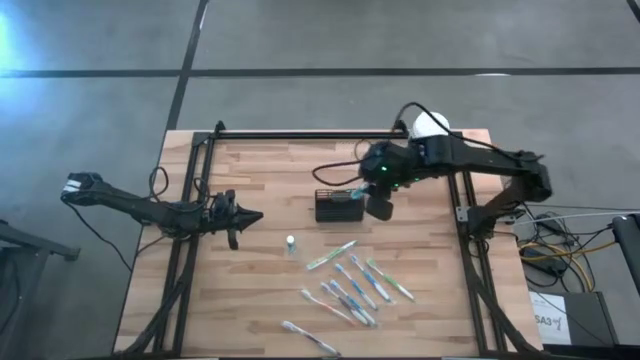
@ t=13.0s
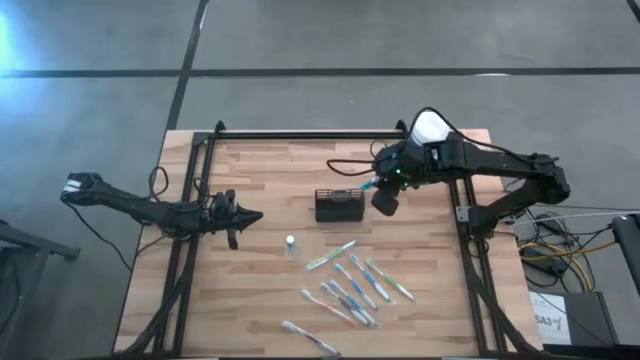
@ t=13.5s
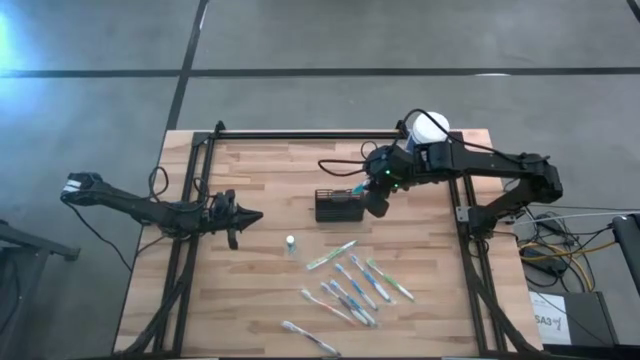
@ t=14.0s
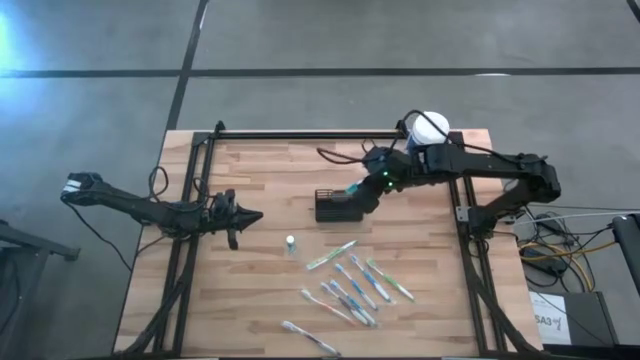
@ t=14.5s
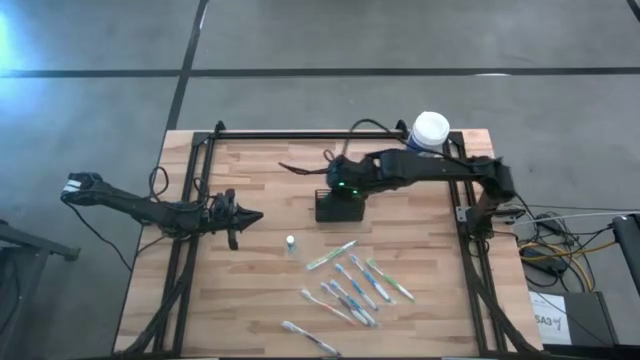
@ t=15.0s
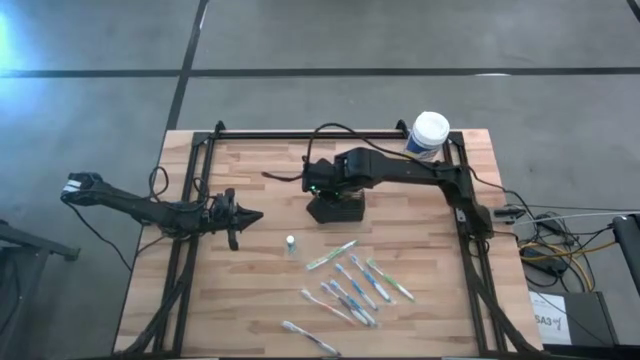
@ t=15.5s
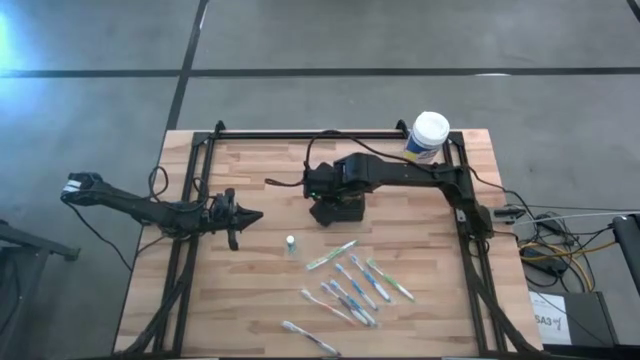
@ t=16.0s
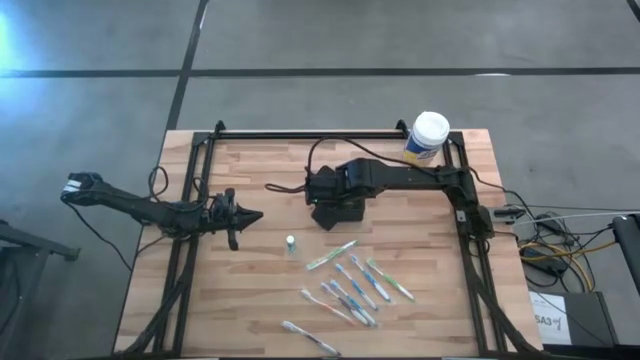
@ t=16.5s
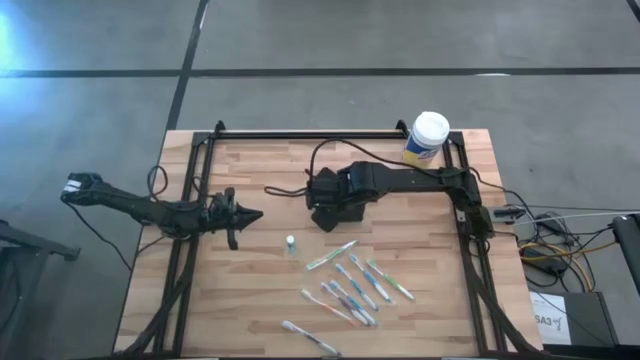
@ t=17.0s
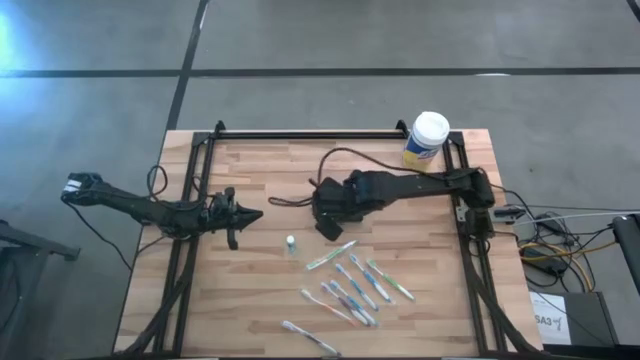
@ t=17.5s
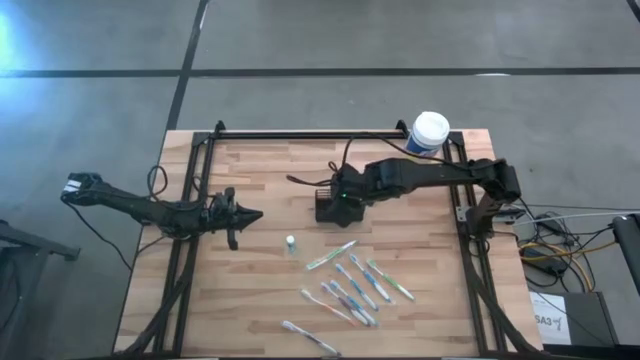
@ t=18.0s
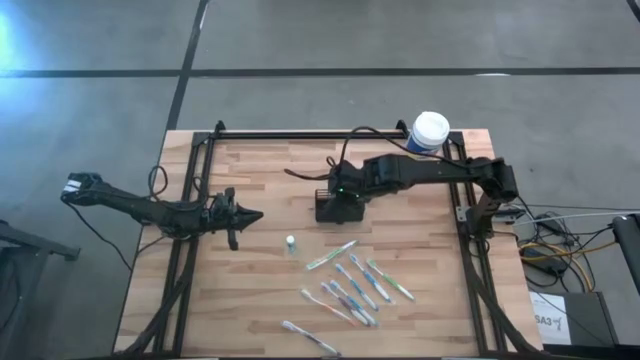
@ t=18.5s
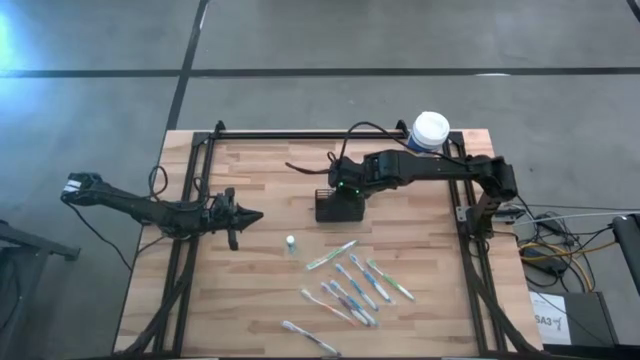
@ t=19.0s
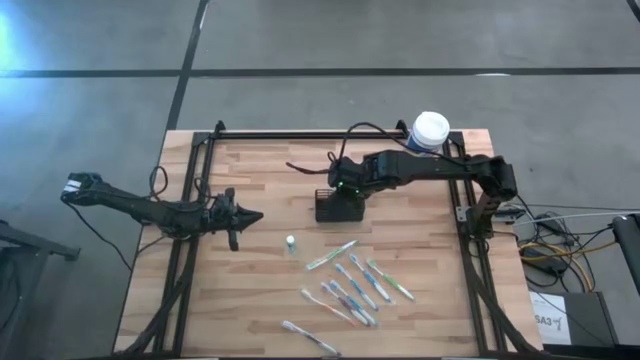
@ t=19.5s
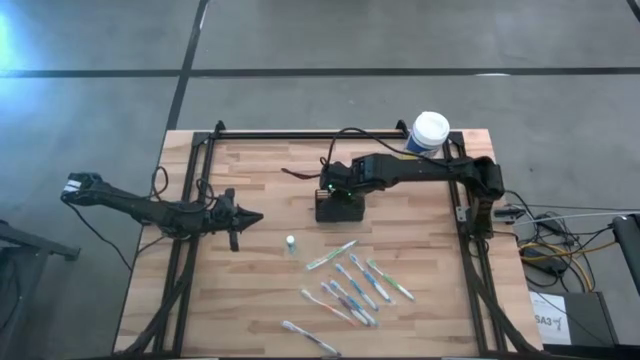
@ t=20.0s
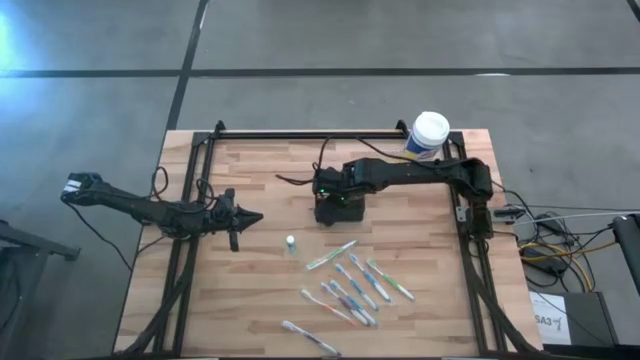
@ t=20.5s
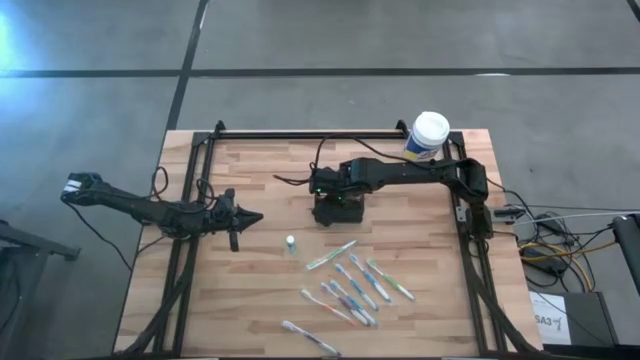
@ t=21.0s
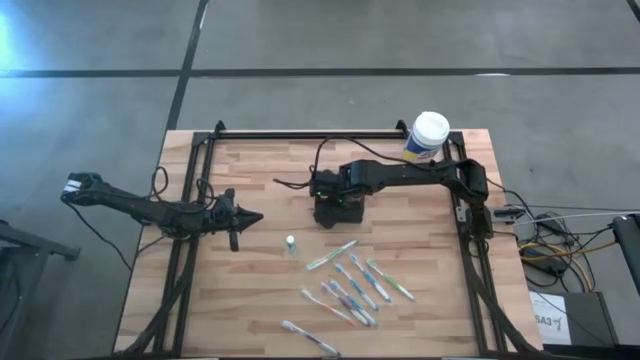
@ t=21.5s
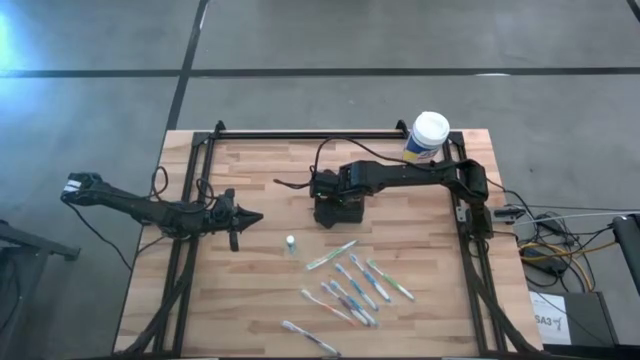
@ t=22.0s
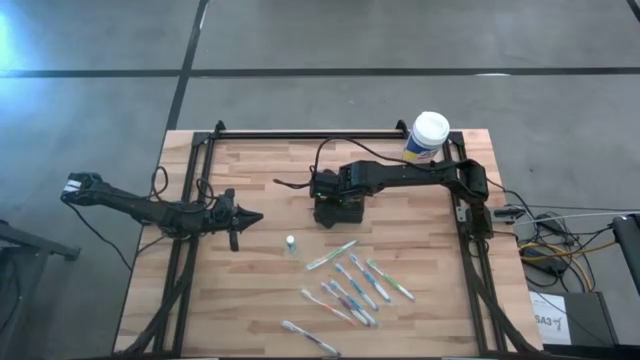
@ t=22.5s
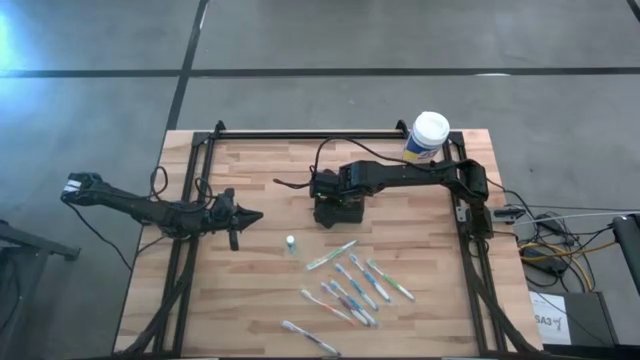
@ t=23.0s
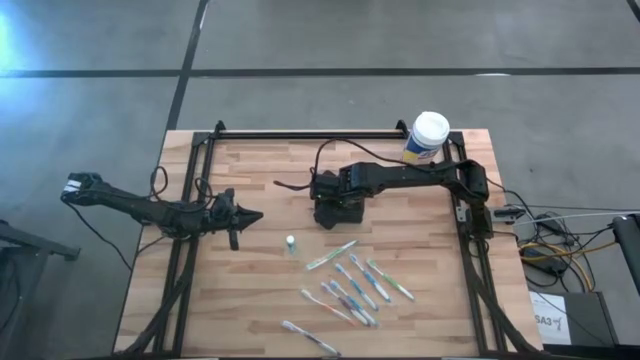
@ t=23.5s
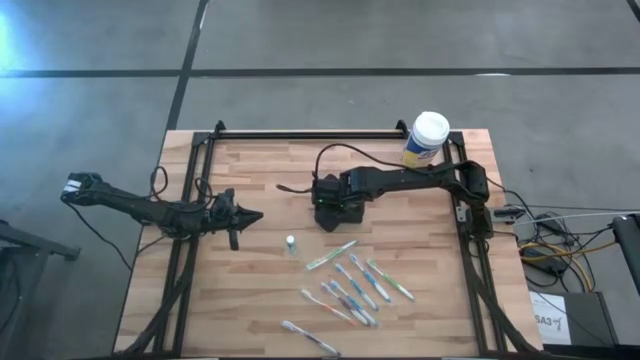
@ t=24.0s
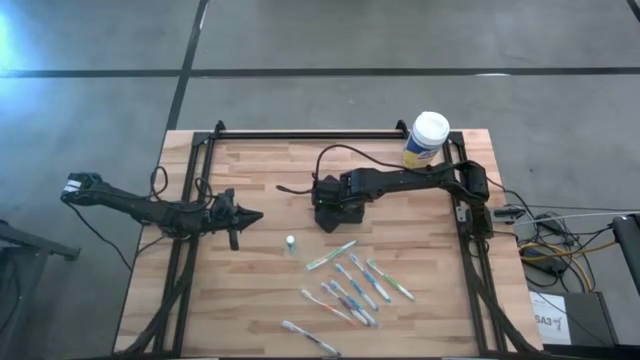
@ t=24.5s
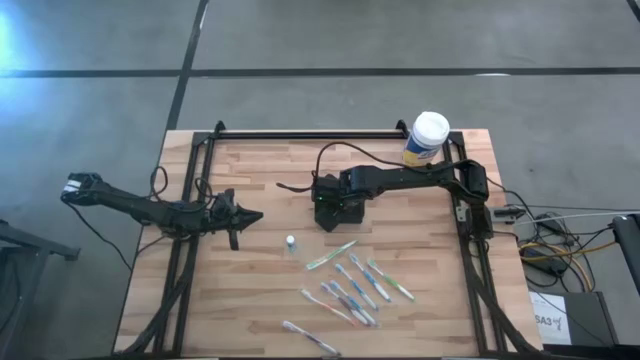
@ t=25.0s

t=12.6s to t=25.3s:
Task: Pick & Place toothbrushing station
Put the bottom blue mouthwash into the black wire organizer

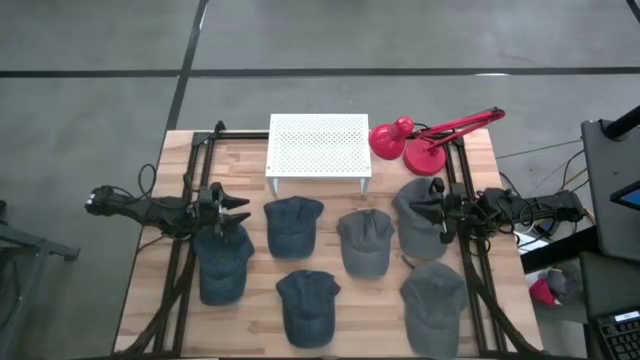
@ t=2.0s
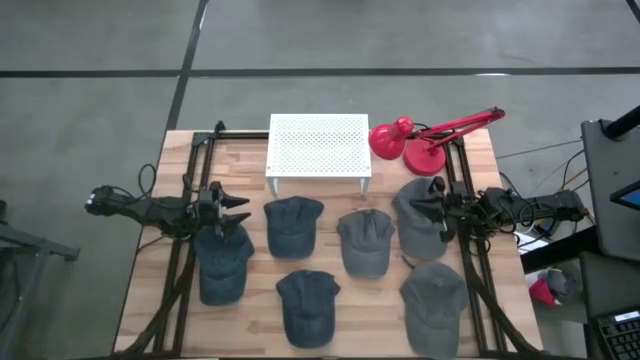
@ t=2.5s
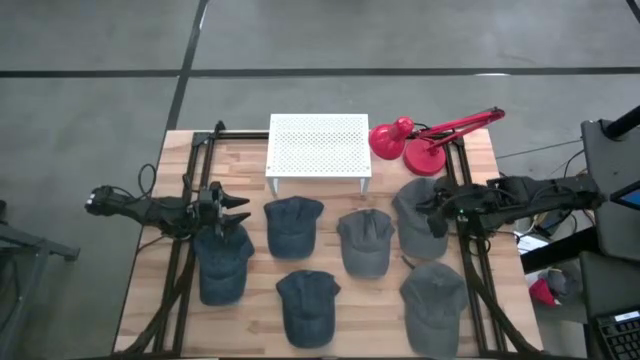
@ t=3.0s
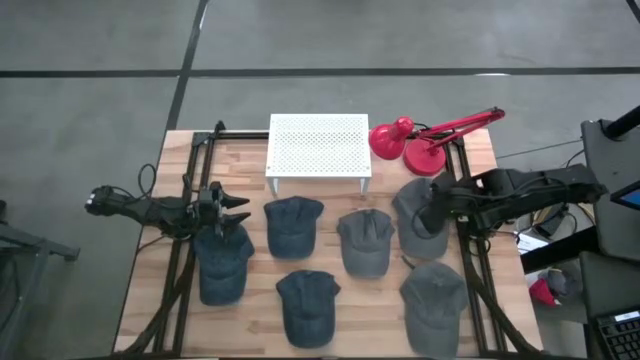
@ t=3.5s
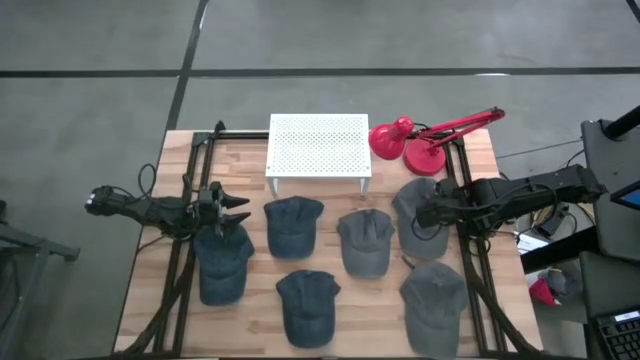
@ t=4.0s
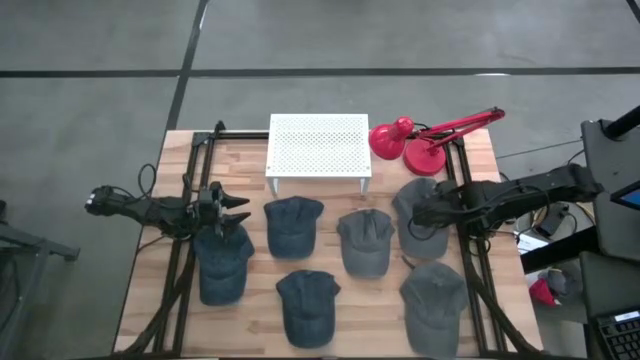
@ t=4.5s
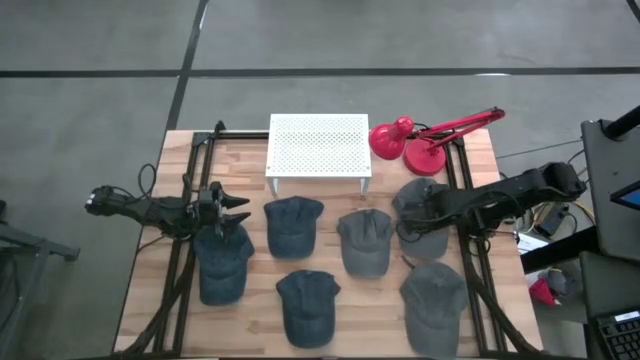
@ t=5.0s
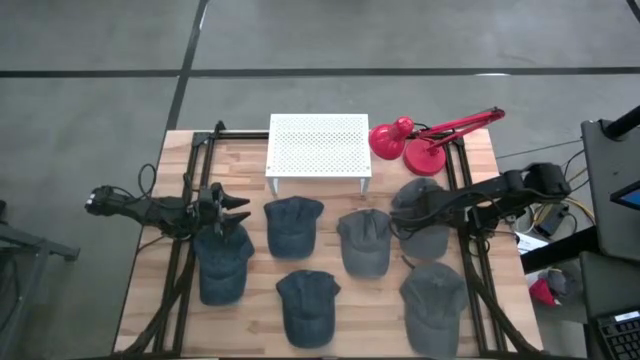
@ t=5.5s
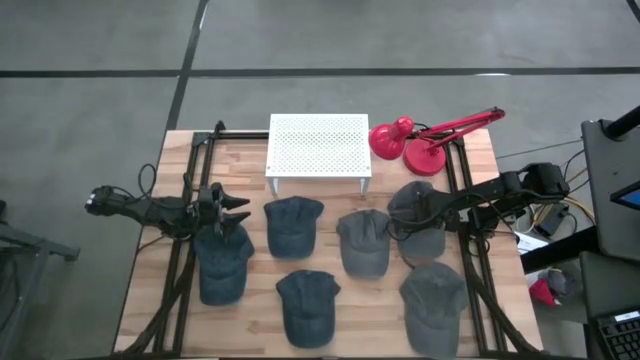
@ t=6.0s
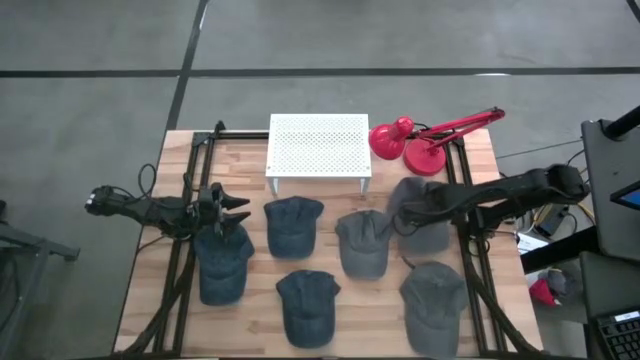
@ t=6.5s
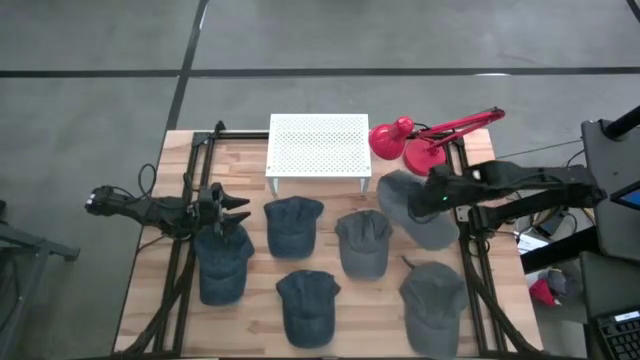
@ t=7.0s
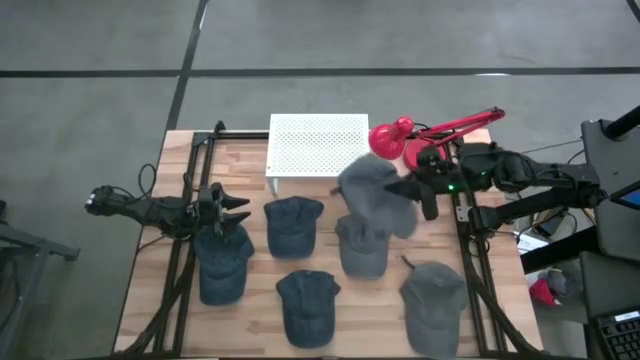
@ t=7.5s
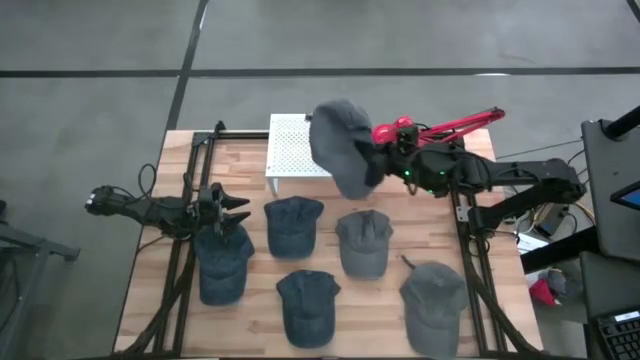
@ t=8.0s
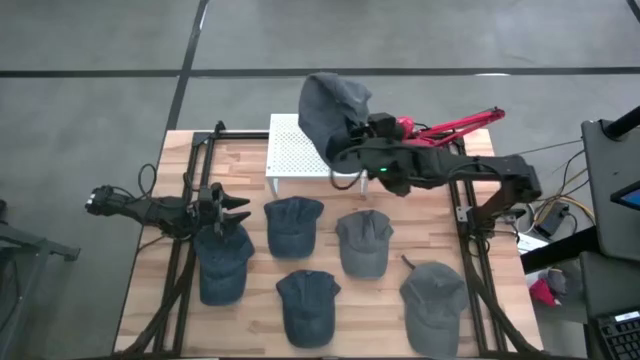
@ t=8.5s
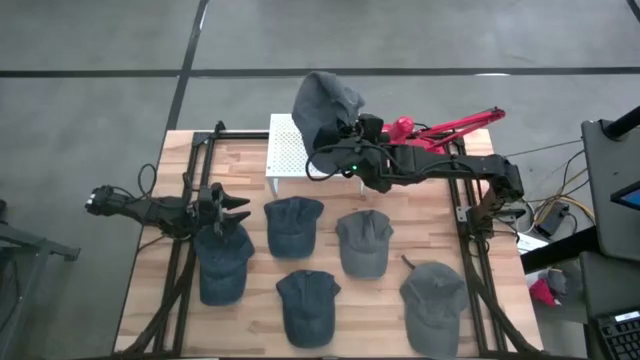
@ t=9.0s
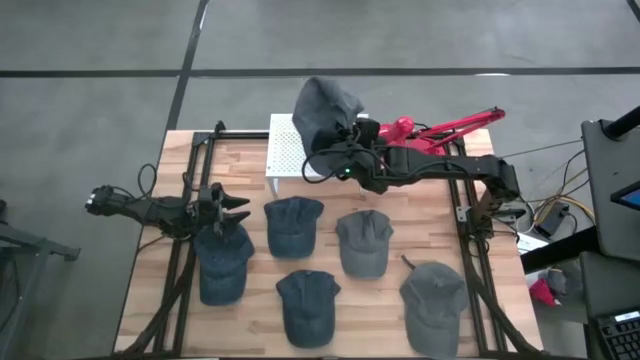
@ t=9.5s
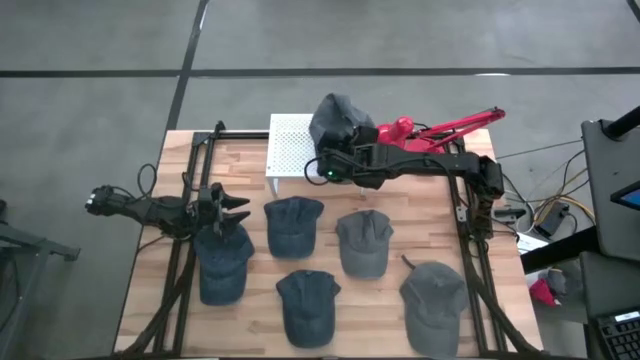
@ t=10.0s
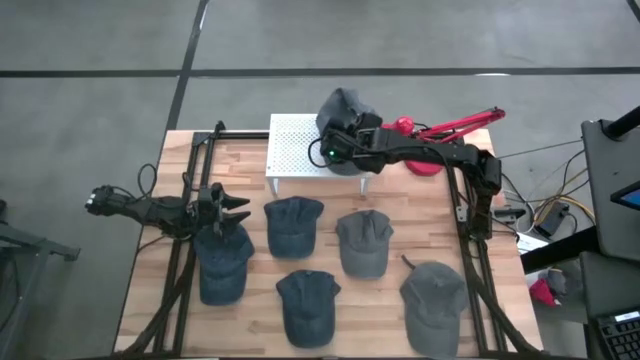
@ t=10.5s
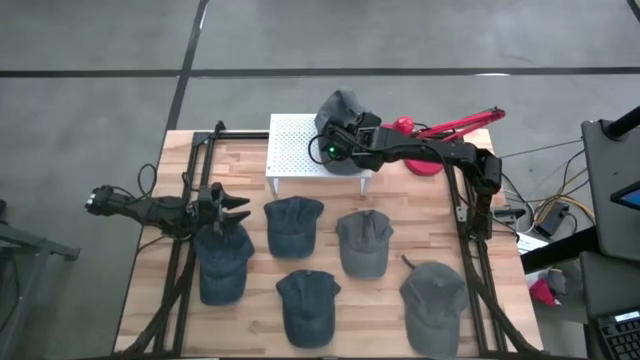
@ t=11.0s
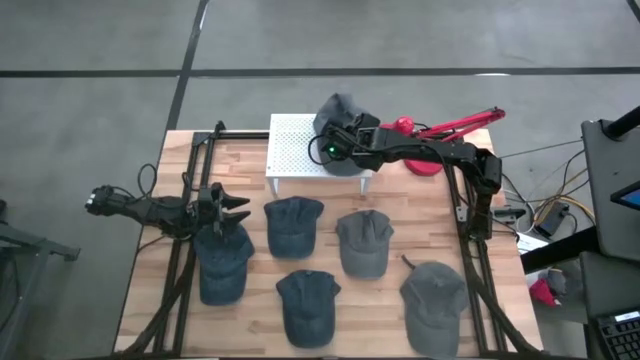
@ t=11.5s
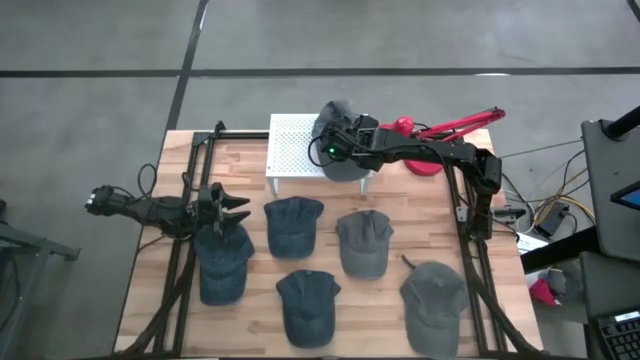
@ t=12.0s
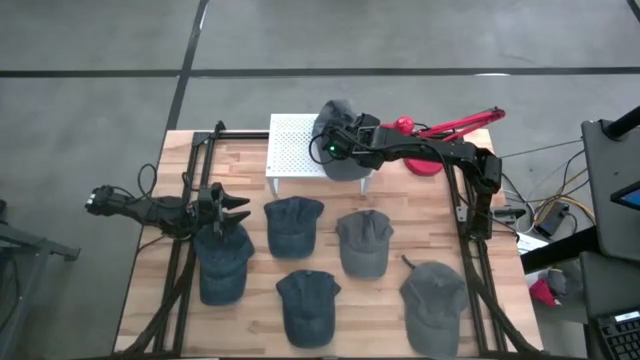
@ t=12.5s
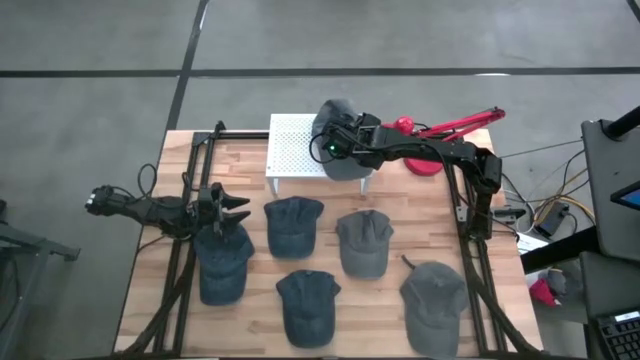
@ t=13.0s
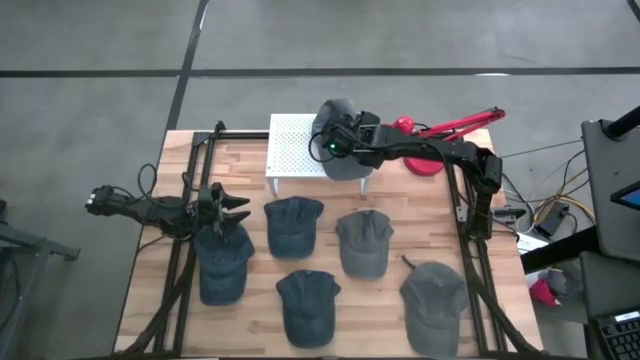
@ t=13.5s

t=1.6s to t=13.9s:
Task: Pick & Place hat
Put the top right gray cap on the shelf
